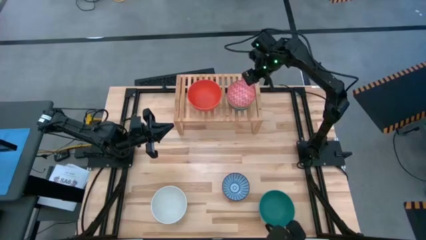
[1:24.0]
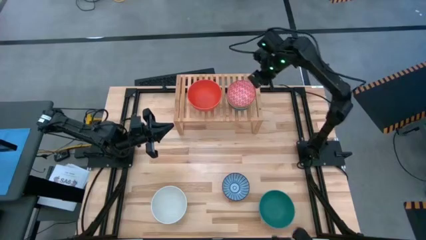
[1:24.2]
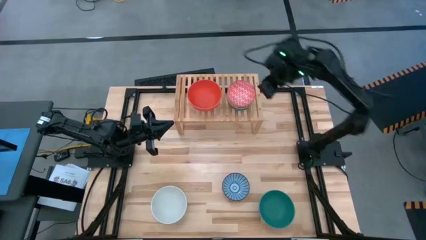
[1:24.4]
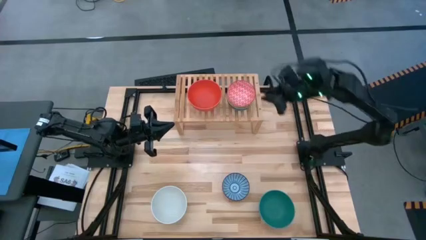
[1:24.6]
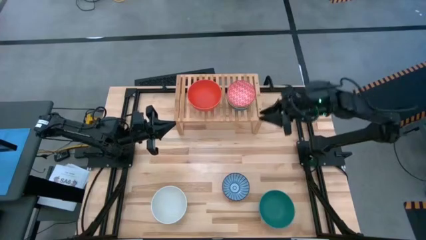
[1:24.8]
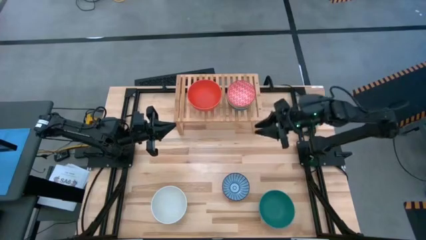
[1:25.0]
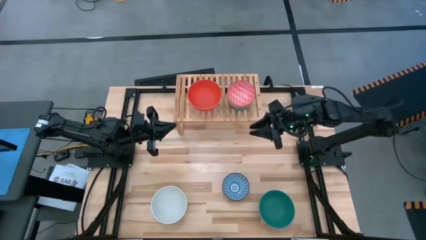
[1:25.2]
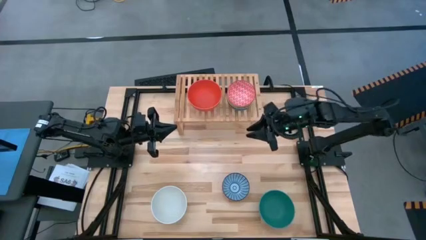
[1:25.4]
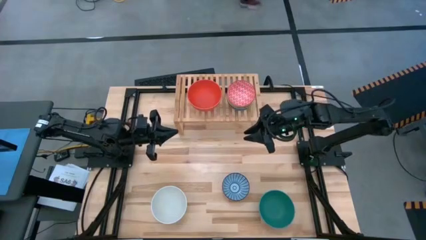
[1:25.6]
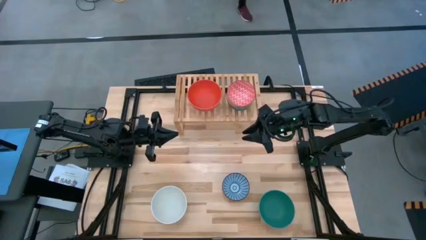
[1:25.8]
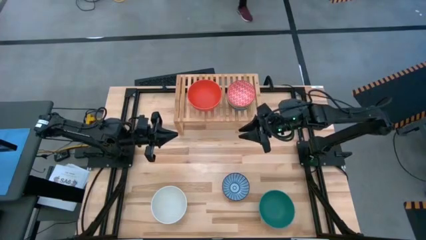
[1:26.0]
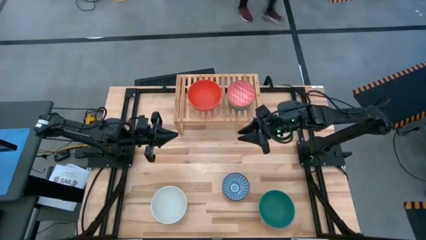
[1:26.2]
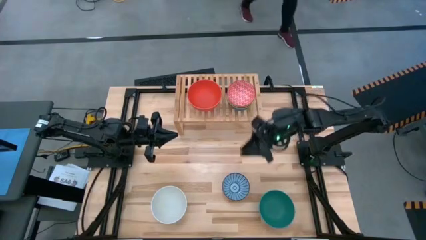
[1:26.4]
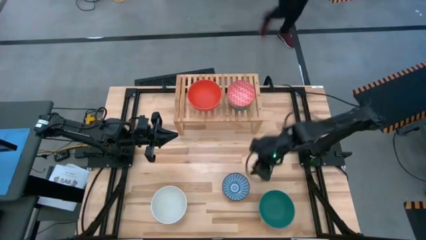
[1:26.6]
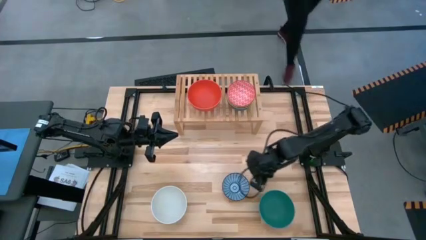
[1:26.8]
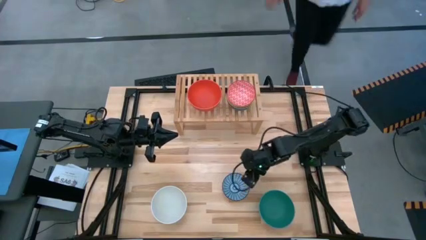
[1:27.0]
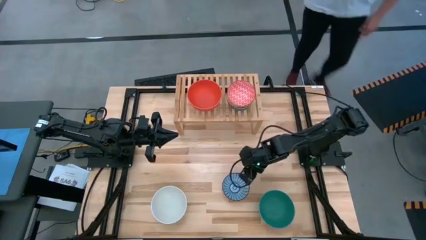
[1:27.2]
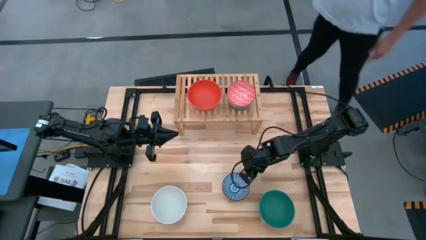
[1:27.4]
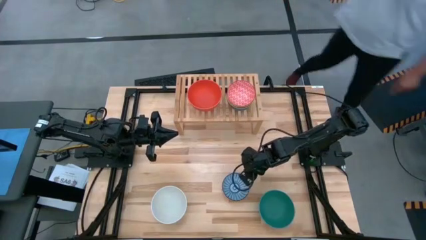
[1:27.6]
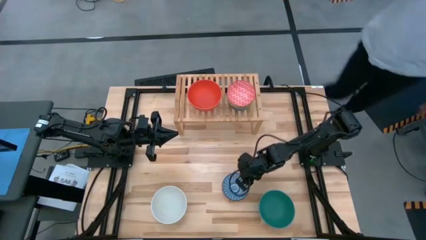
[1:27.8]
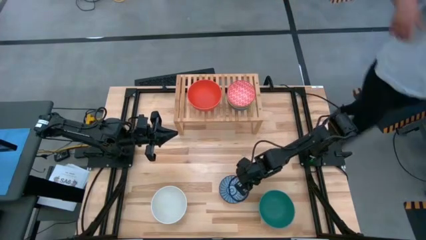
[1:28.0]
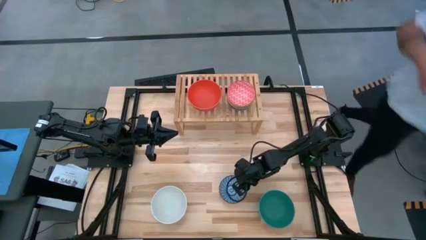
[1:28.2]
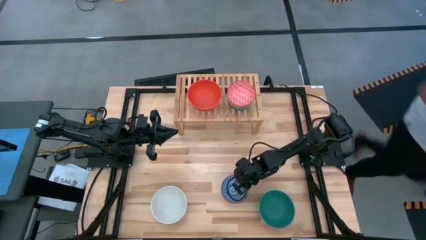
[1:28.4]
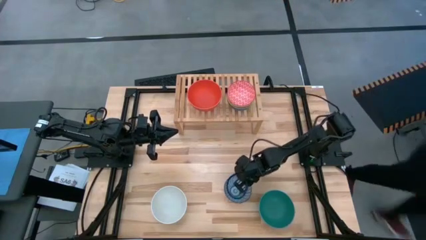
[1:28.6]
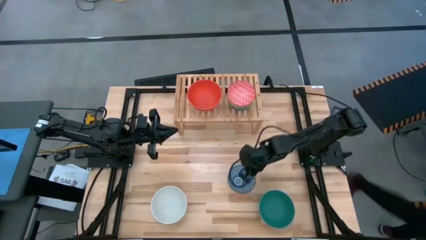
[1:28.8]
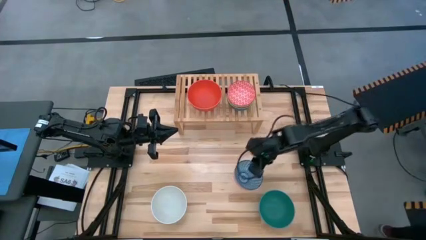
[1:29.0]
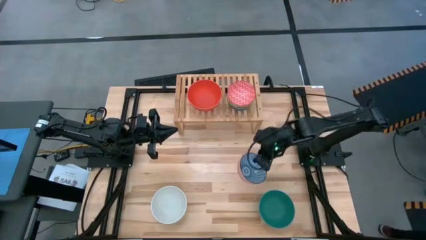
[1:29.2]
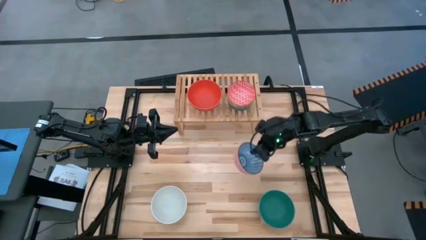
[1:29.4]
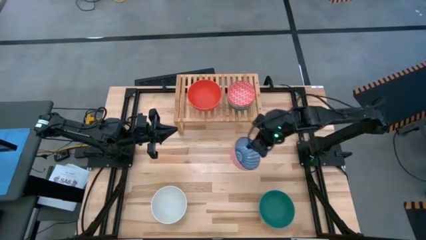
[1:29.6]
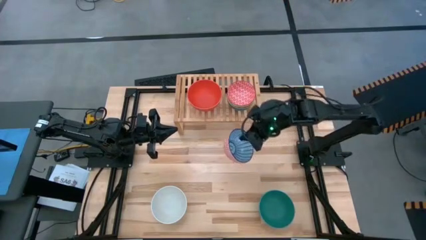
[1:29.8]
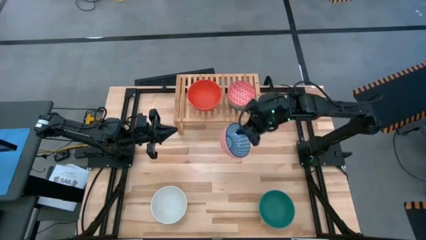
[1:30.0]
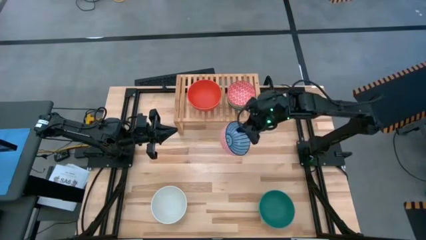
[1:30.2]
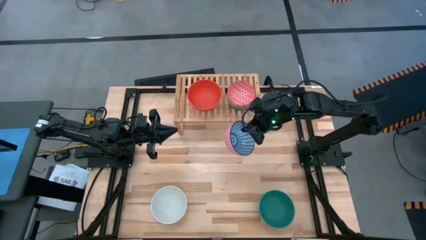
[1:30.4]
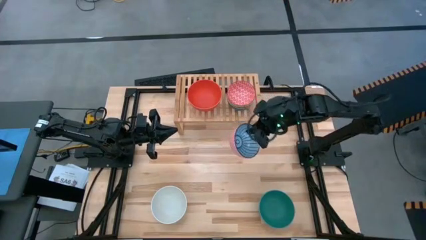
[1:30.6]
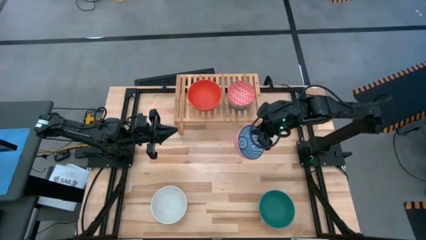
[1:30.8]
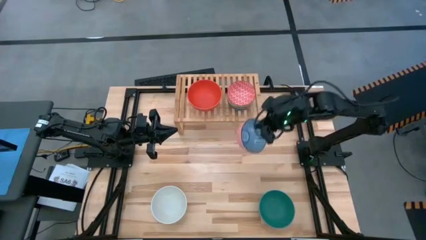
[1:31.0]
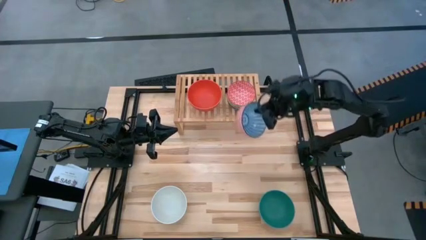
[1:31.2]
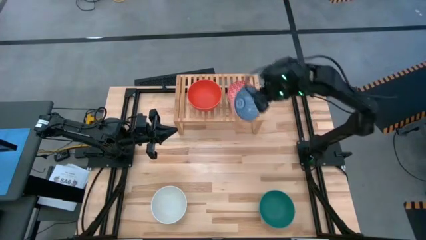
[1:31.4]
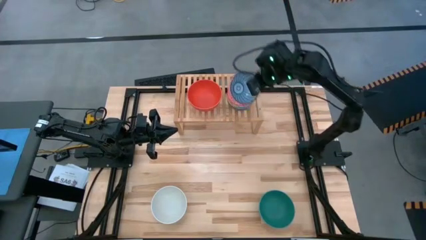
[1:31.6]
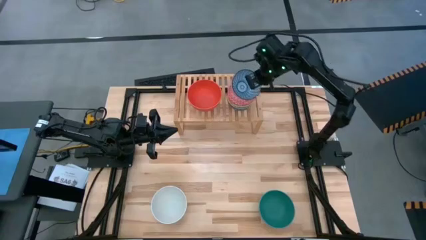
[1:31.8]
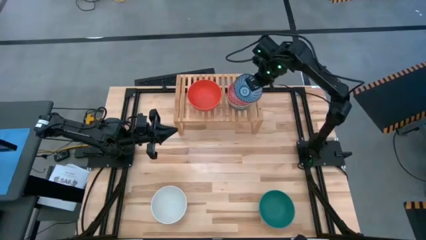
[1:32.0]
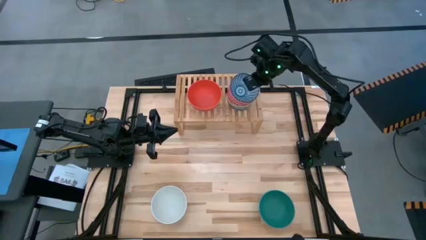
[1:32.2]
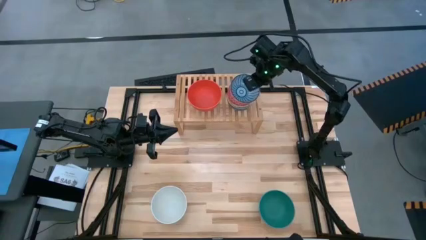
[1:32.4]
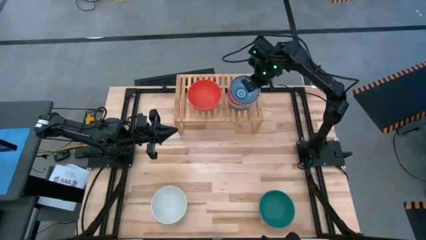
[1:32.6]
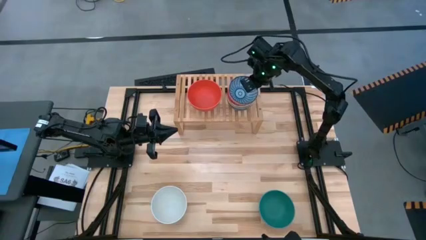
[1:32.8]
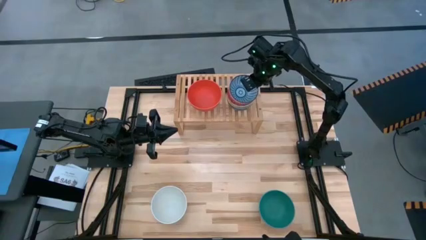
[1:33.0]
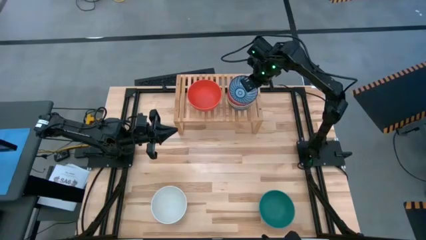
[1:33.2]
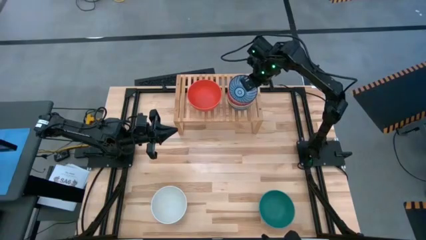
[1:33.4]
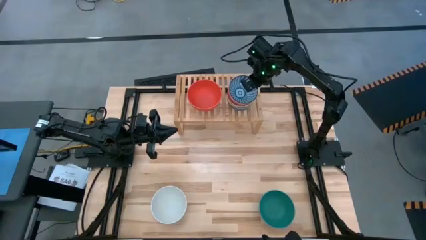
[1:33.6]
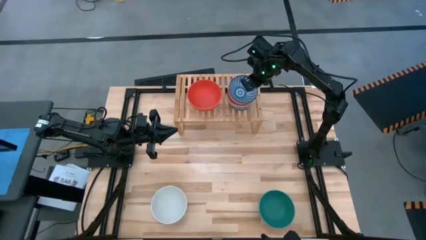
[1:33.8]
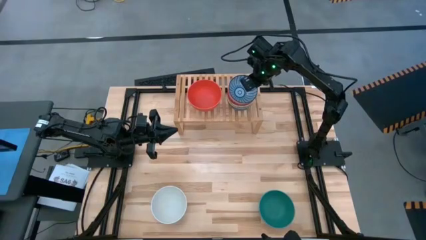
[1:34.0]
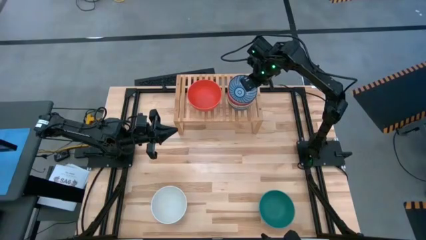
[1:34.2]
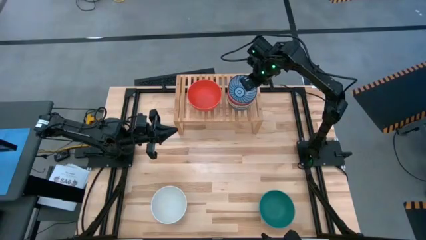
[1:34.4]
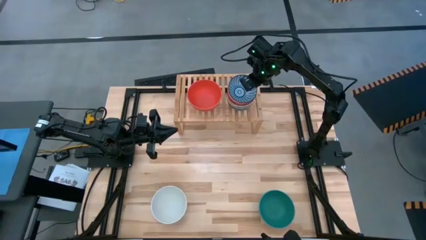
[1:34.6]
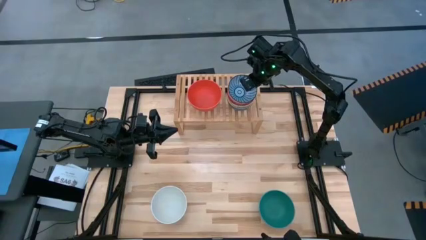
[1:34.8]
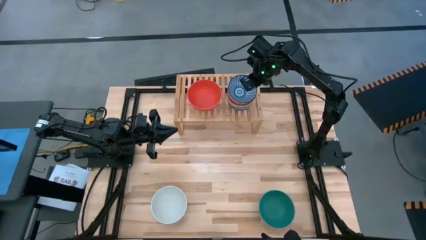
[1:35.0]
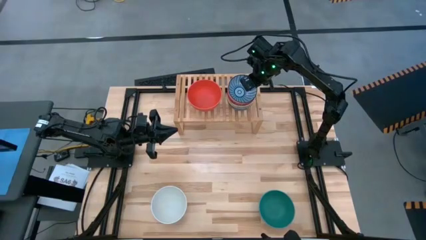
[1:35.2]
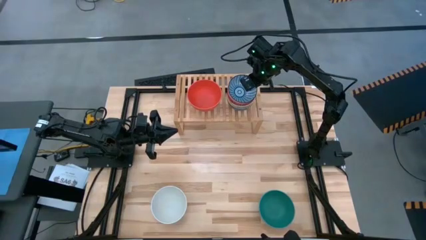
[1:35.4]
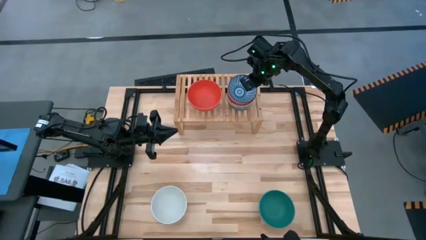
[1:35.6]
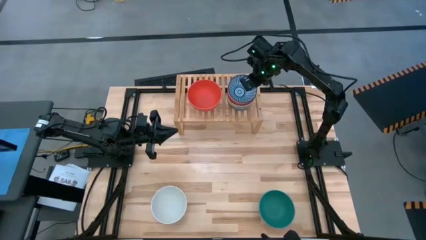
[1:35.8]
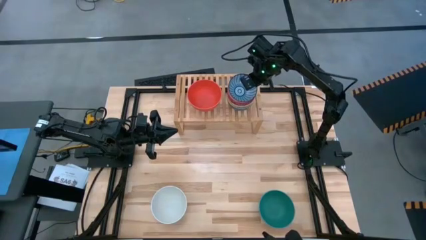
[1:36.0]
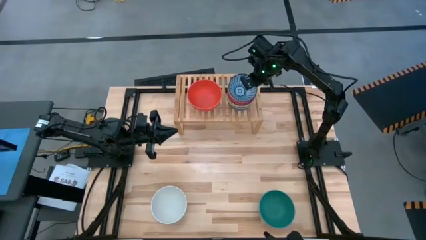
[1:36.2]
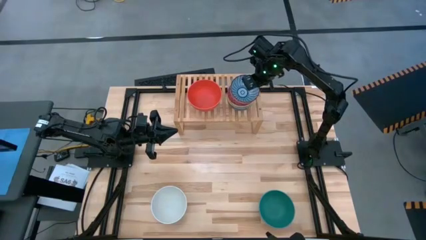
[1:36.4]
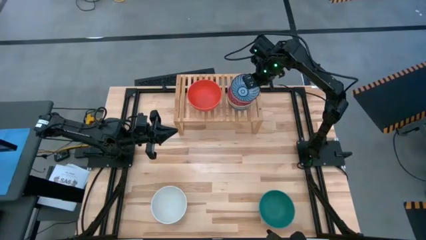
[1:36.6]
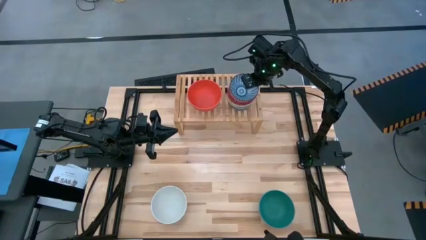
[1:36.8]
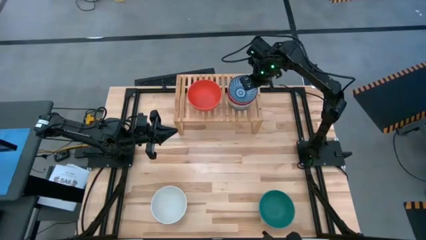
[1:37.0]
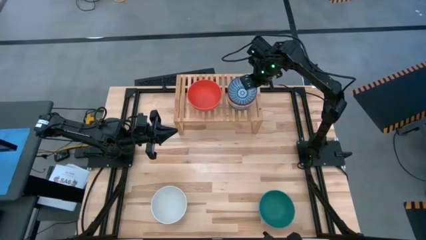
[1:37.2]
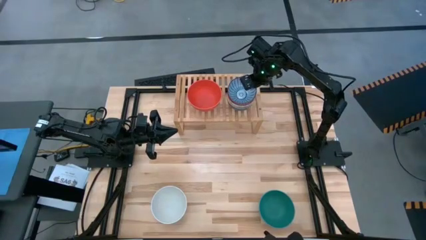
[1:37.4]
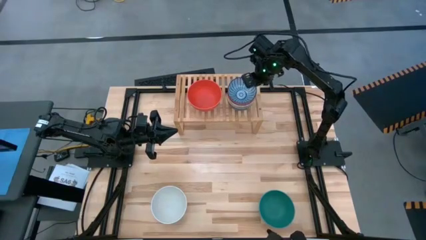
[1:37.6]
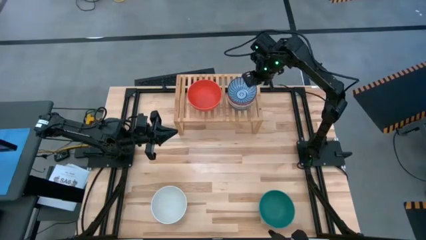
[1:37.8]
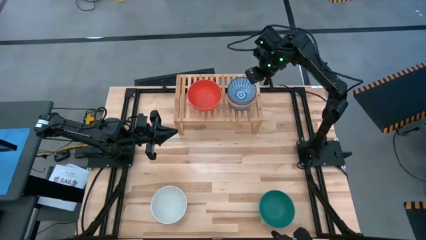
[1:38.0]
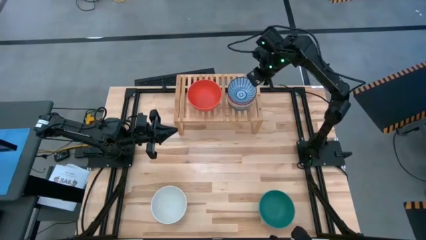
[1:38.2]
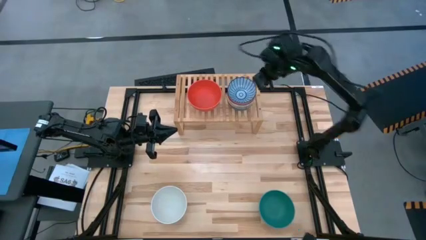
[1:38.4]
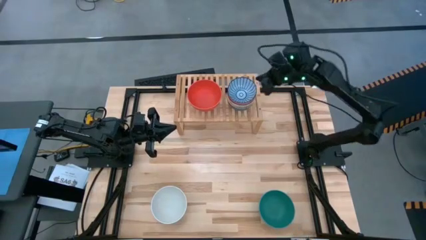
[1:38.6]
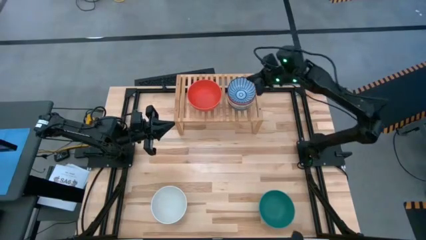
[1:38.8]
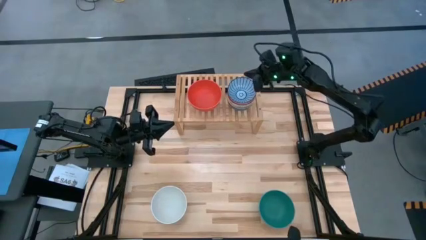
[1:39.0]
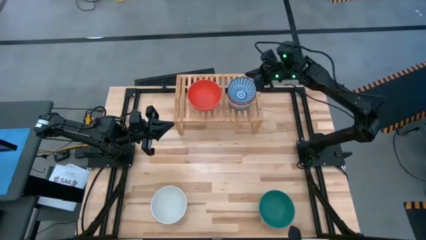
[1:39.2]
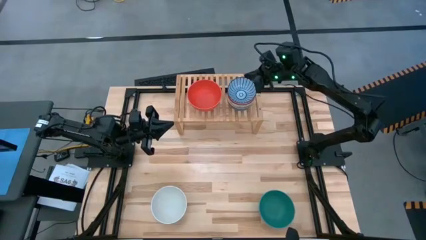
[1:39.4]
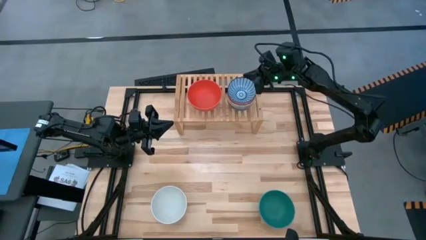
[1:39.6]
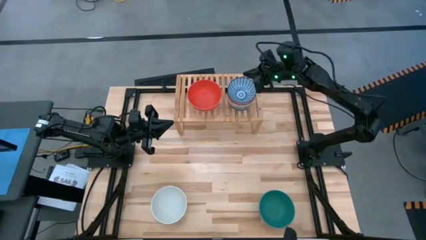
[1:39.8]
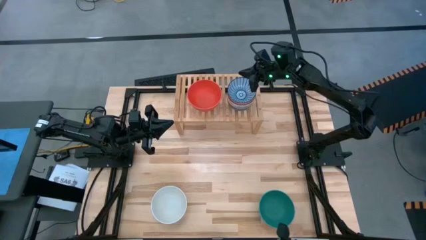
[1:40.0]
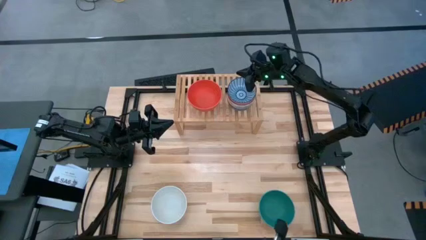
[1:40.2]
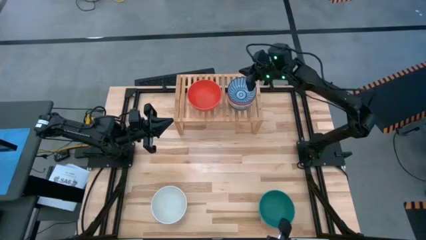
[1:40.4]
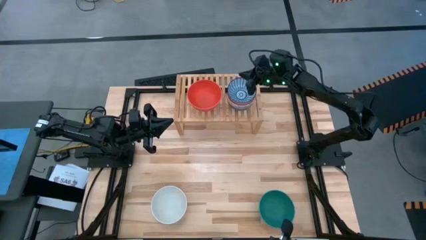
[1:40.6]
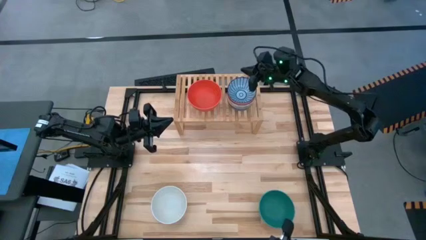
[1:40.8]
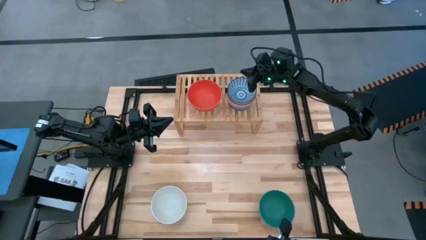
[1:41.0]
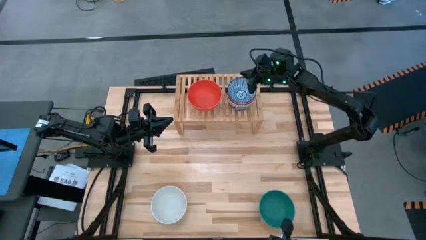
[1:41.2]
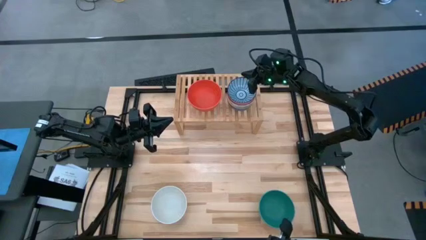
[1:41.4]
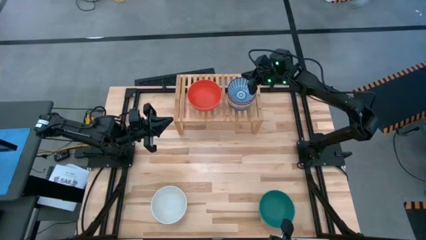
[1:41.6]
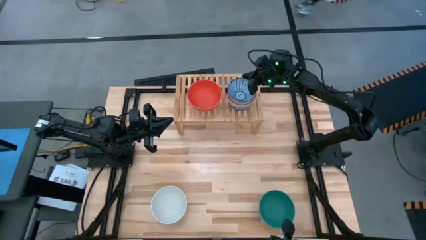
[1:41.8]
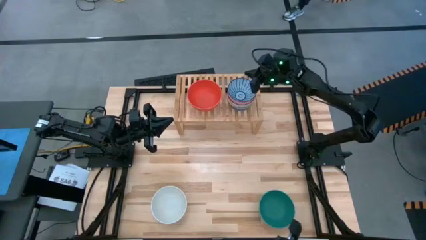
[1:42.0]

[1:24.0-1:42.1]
Task: Place and stack bowls onto a shelf
Stack the small blue bowl on top of the other small red bowl on the shelf
